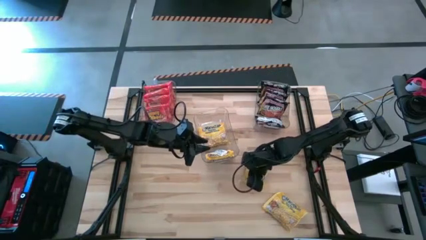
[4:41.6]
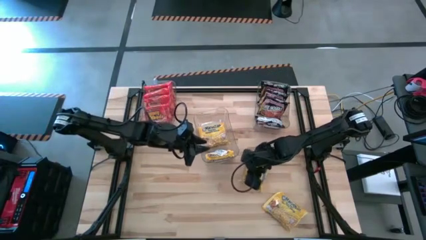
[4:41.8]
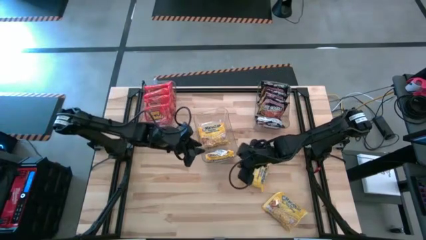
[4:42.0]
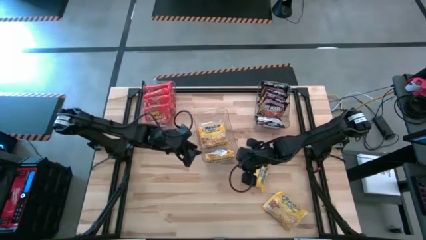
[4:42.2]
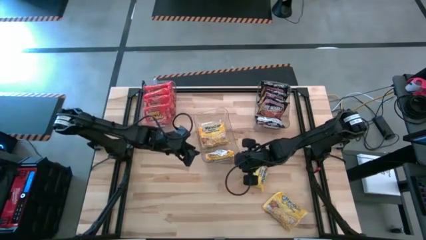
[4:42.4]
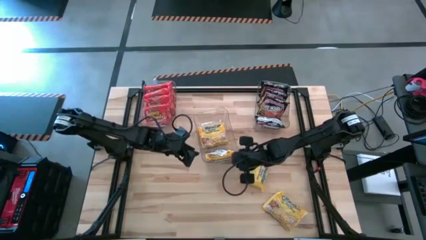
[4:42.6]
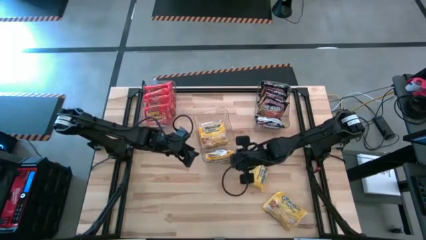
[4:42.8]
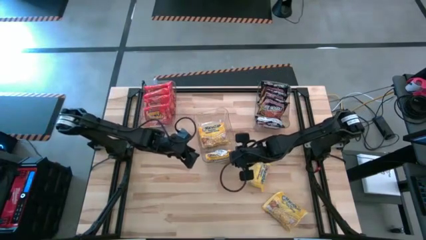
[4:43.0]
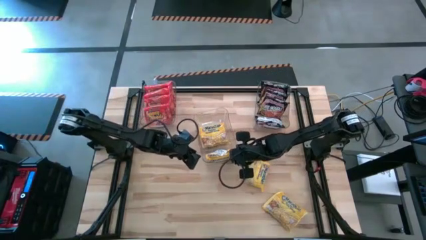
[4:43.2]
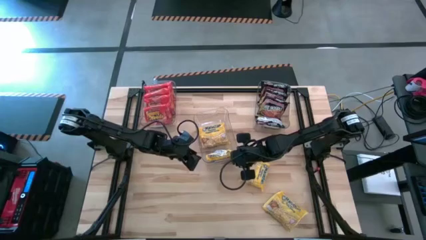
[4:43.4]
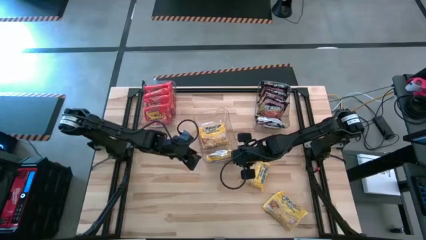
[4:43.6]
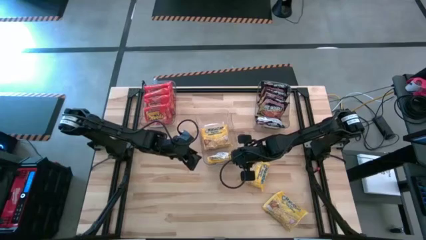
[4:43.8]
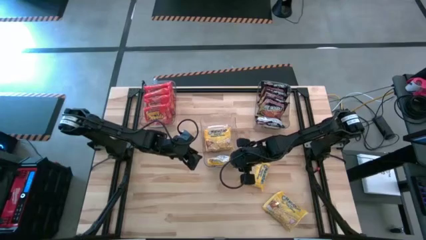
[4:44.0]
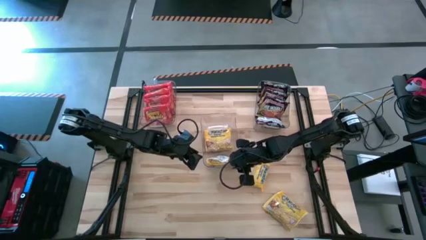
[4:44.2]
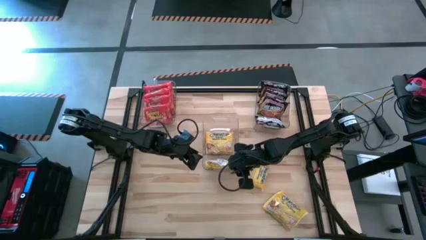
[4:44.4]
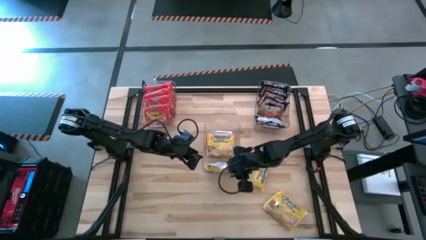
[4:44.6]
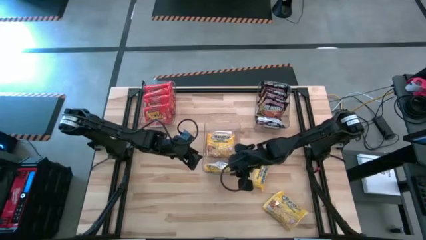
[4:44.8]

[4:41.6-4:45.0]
Task: Sort Maruchan noodles
Adjust the center transparent bin

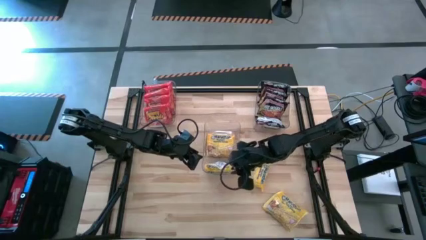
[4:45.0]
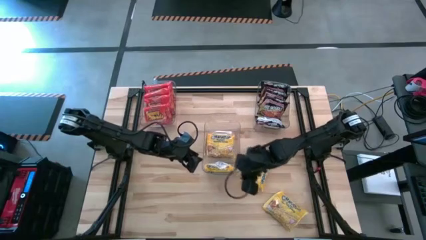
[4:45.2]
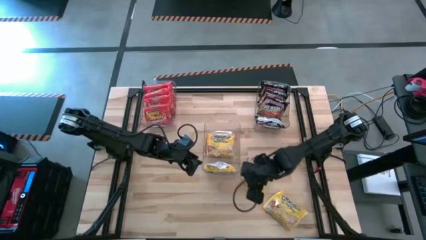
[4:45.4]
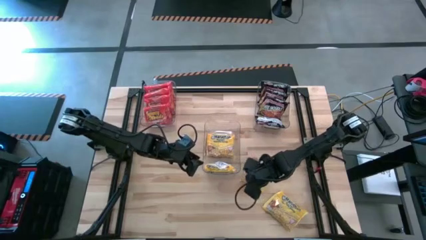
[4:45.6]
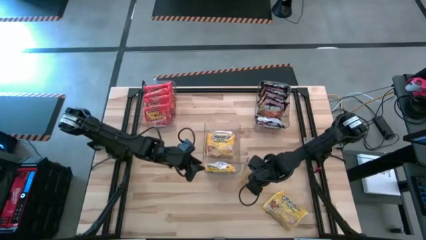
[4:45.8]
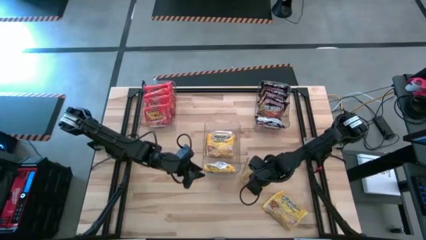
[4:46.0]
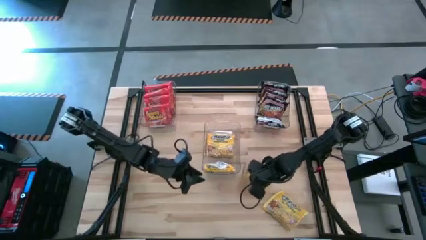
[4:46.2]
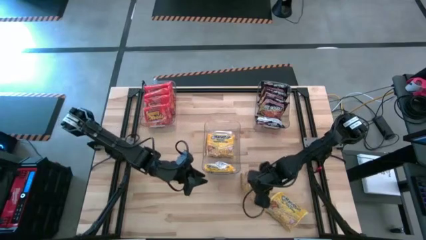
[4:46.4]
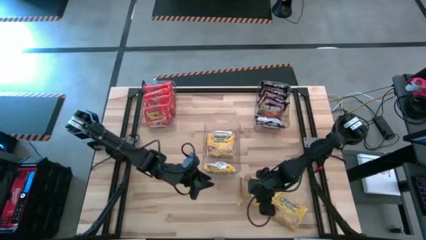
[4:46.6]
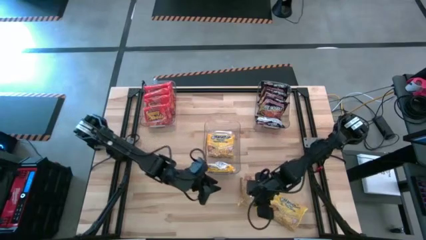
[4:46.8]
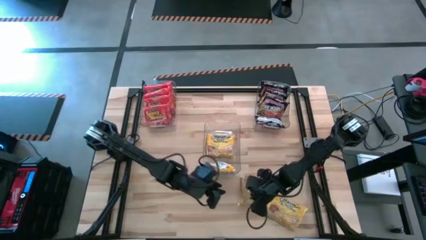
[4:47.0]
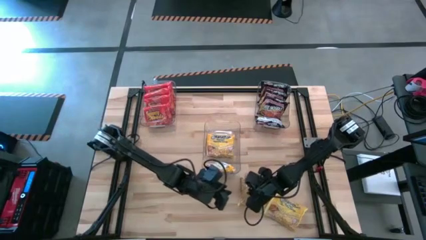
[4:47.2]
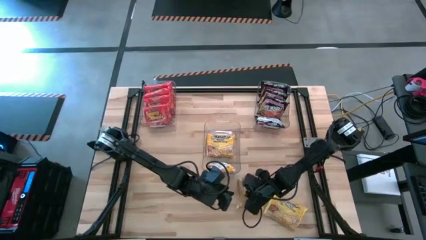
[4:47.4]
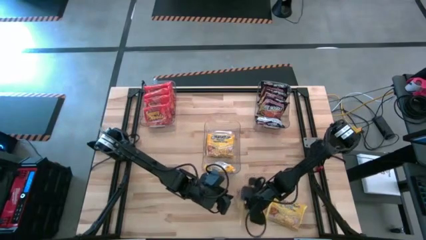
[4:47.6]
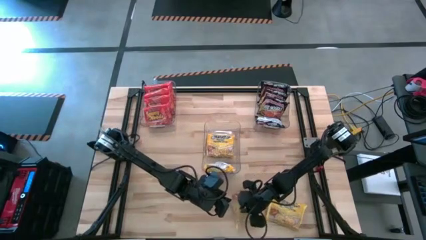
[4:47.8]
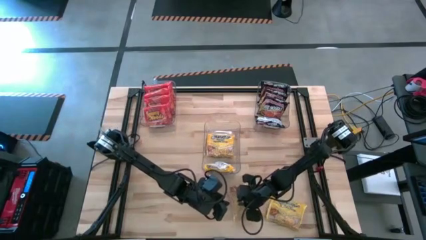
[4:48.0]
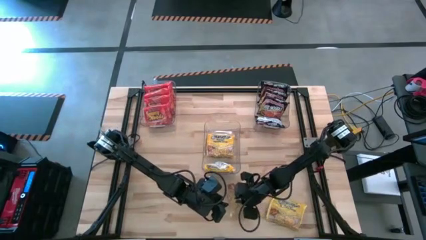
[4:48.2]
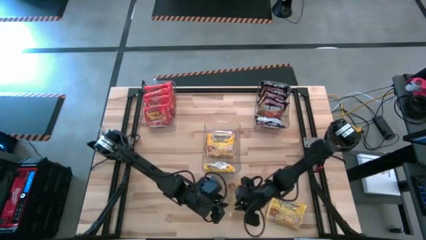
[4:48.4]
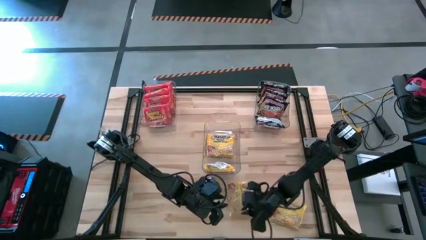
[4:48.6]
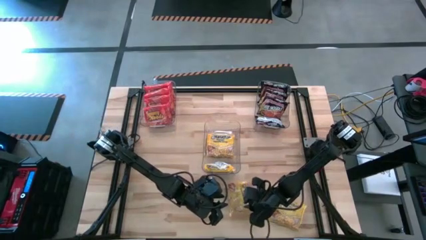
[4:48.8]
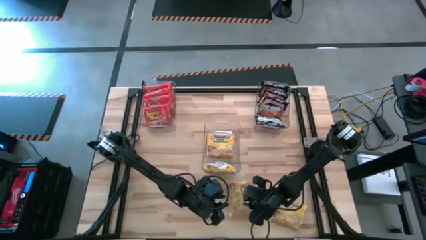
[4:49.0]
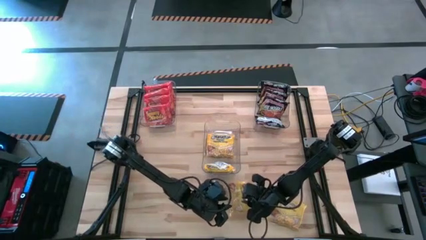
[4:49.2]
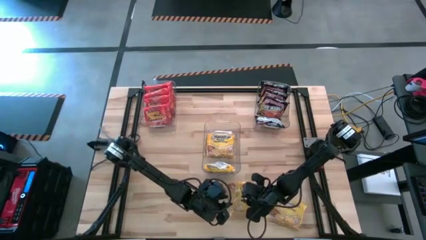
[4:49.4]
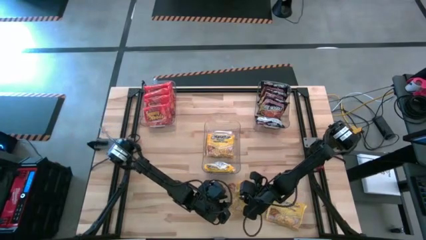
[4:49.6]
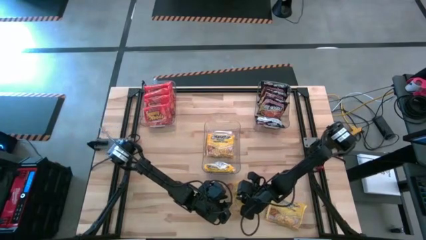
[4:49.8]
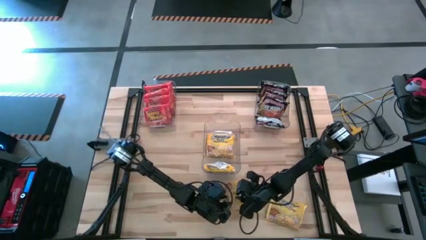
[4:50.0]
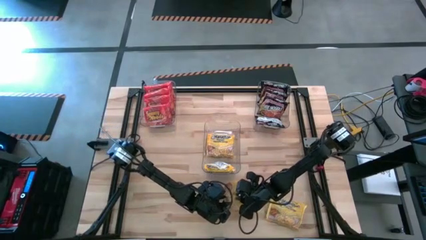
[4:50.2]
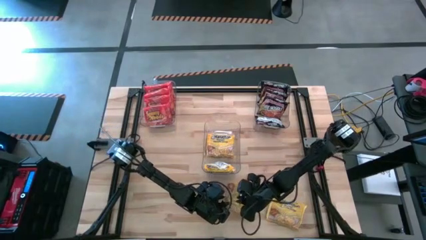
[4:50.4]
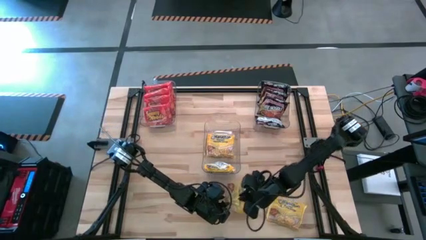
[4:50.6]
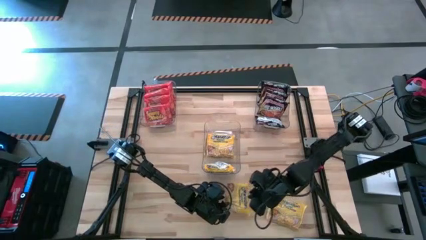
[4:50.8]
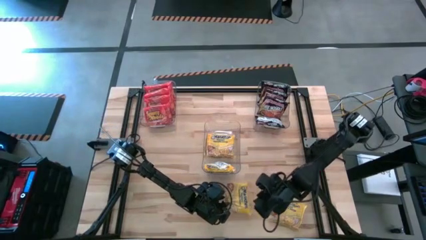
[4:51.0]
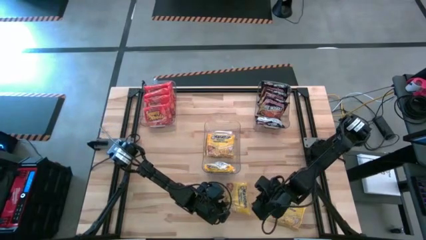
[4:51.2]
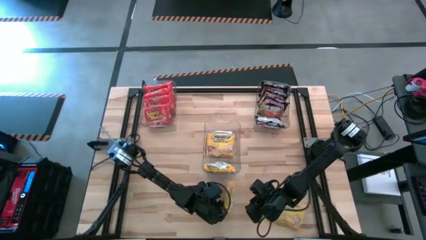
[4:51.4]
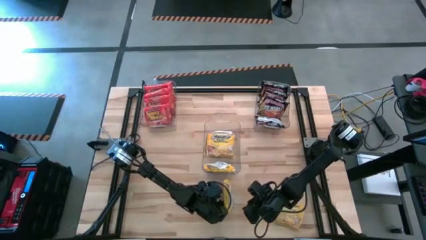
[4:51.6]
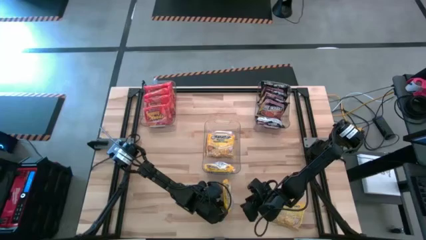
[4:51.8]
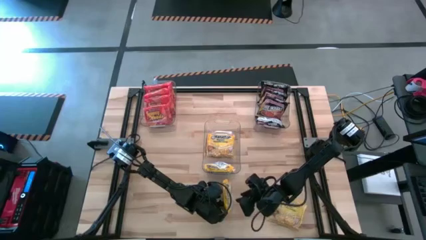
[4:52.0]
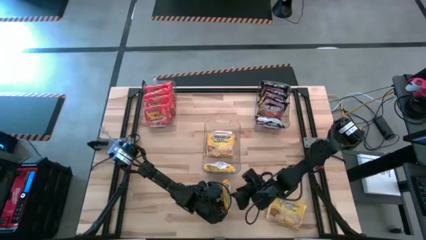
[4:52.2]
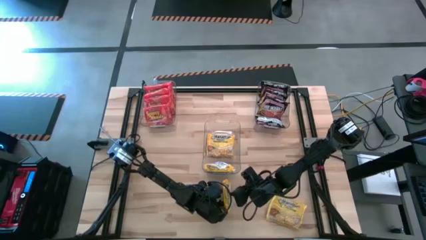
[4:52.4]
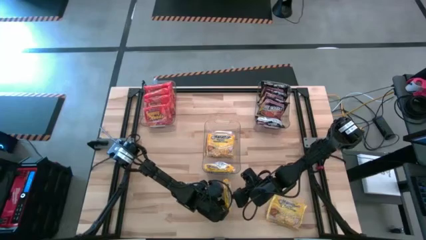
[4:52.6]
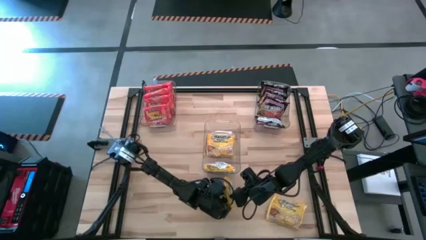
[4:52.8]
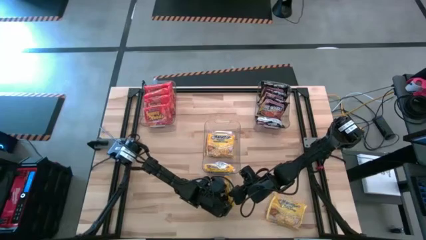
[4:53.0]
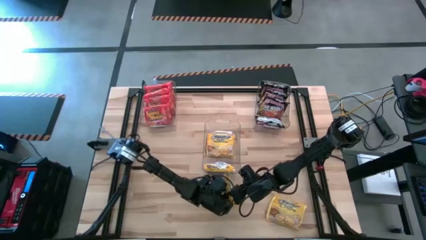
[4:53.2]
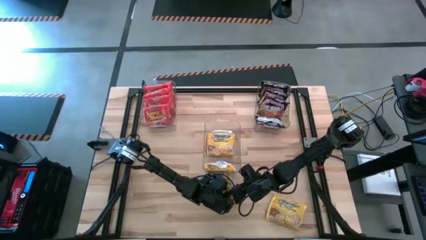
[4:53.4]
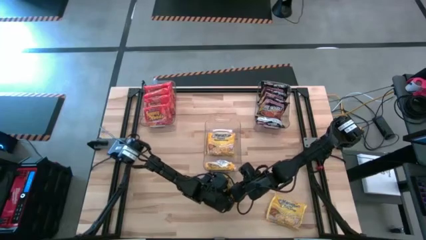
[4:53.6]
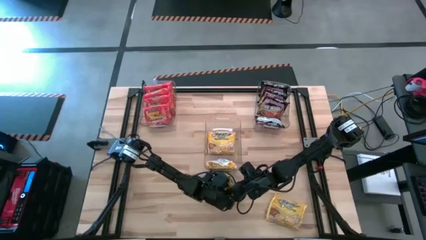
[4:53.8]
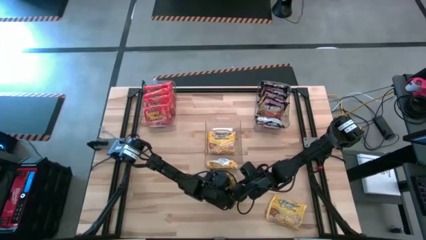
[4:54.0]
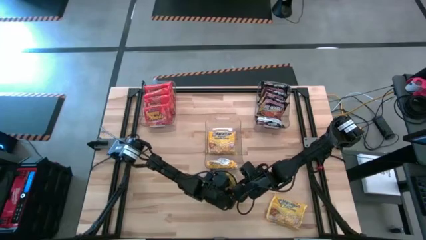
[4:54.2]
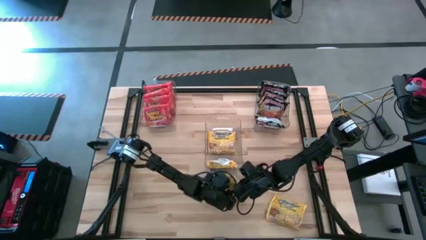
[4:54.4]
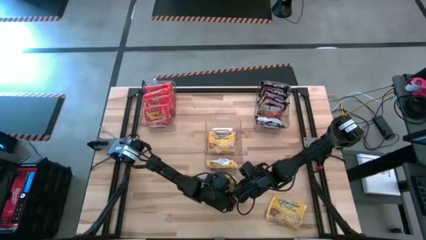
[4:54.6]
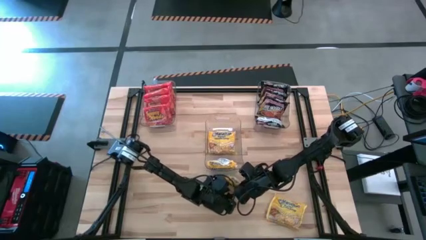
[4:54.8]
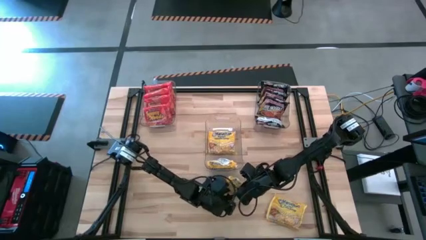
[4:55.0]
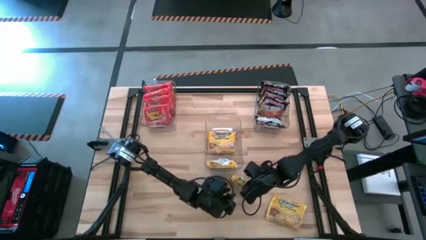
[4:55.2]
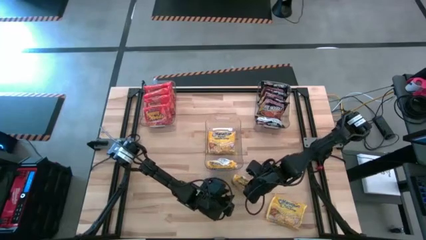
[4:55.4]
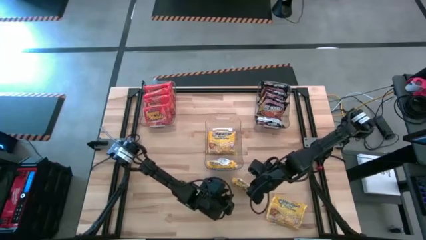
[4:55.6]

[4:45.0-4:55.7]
Put the top yellow noodle pack into the center transparent bin

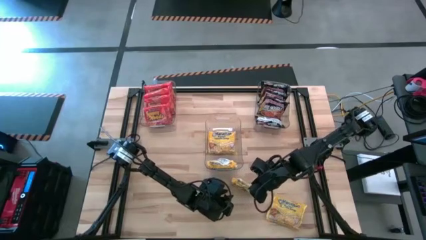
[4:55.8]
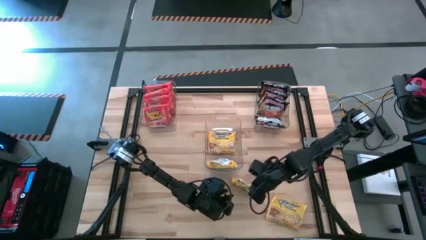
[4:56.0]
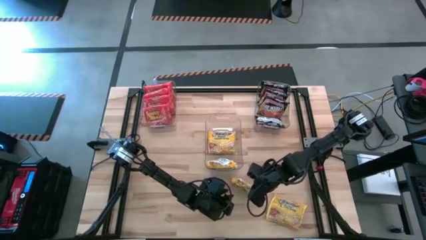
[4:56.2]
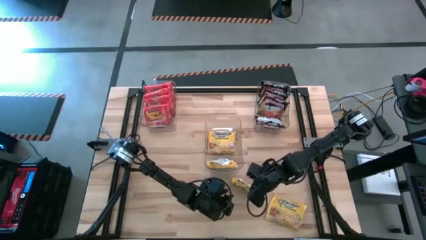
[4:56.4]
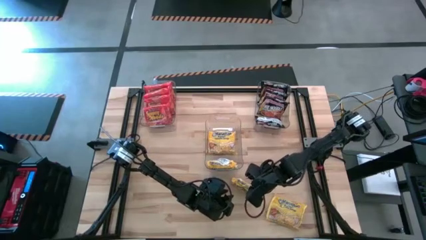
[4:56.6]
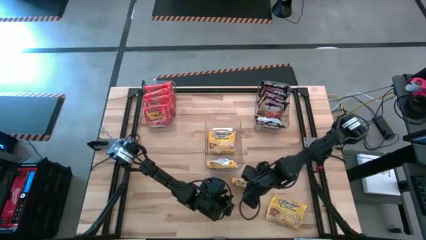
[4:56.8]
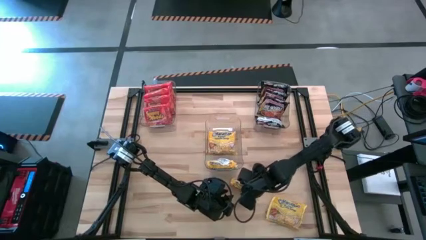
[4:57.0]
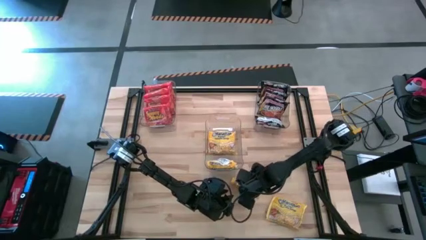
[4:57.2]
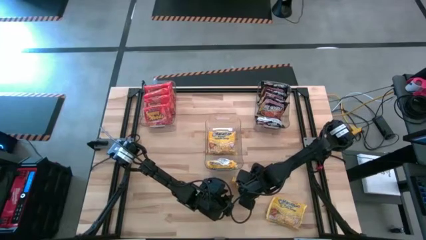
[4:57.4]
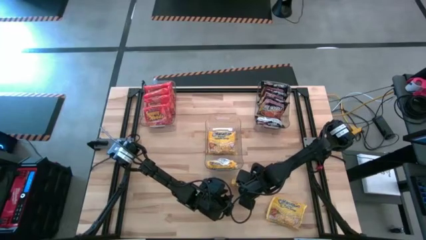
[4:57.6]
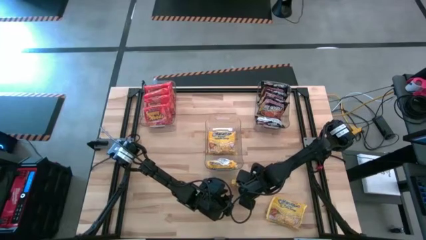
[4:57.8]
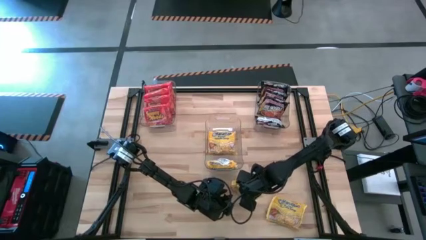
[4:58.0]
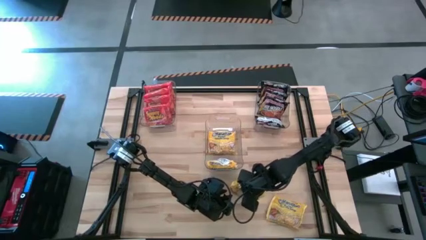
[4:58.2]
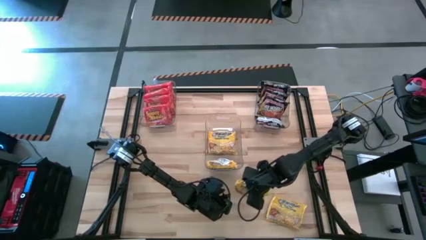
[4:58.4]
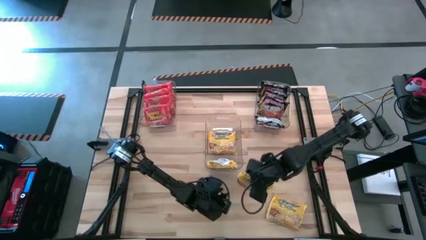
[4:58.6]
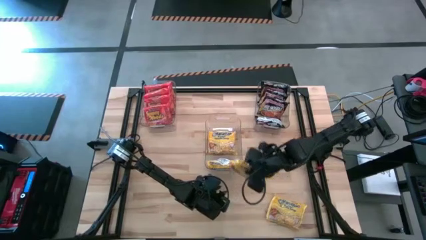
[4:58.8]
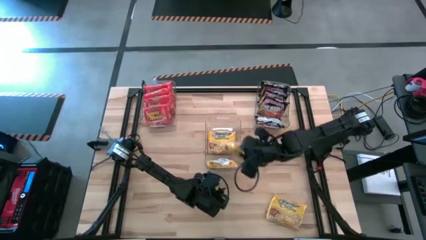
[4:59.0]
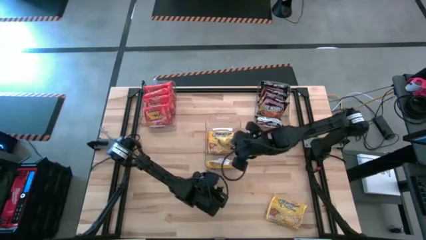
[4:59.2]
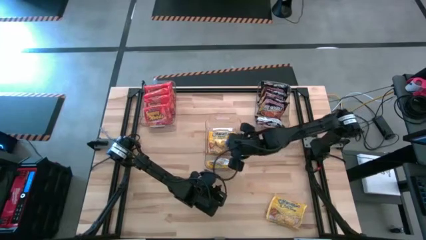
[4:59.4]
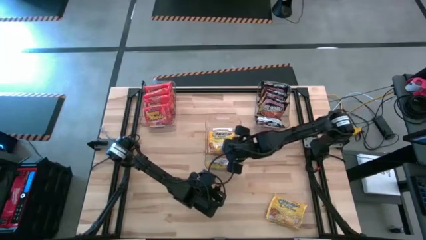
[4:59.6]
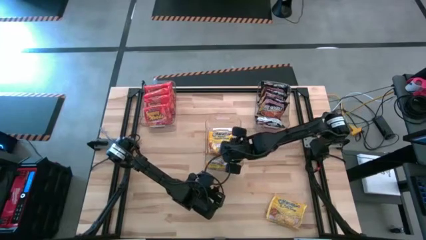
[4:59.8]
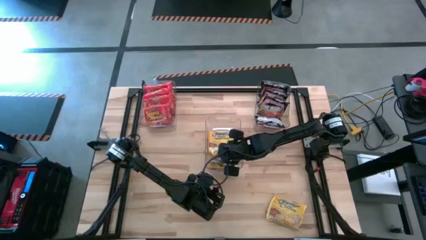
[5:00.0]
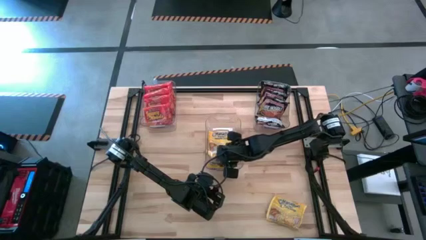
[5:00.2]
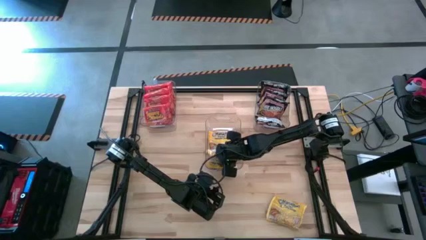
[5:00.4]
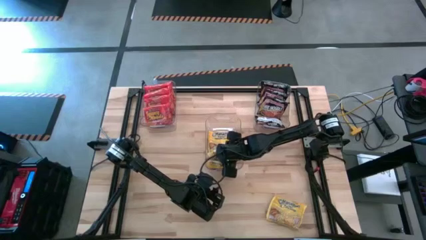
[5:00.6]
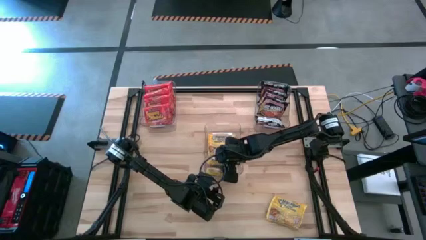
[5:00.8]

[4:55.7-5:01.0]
Put the top yellow noodle pack into the center transparent bin
